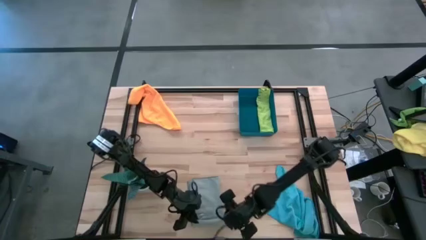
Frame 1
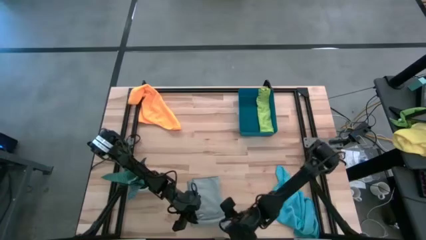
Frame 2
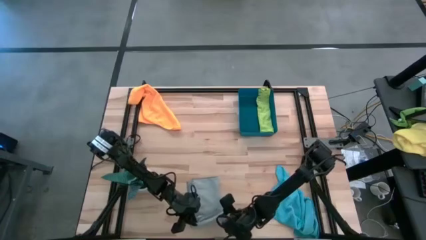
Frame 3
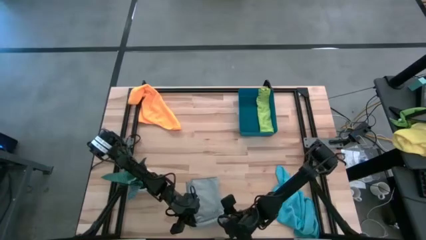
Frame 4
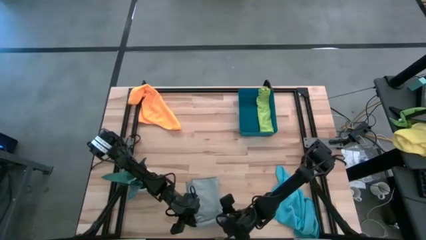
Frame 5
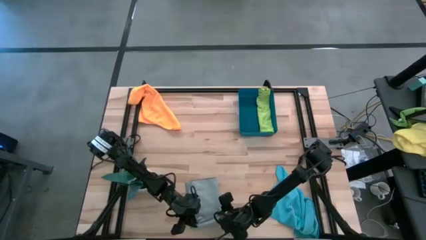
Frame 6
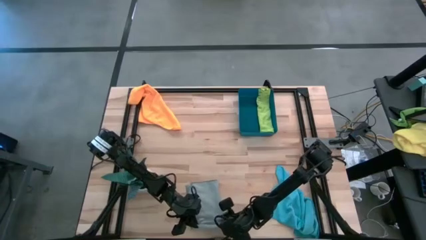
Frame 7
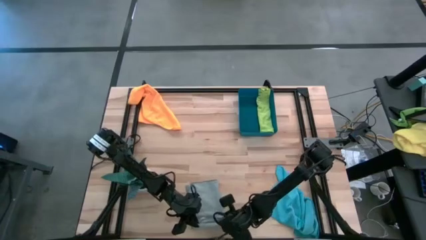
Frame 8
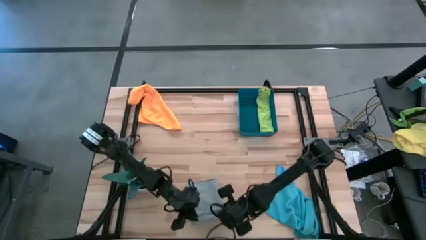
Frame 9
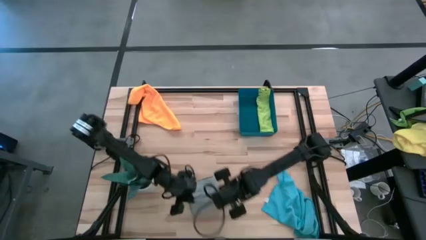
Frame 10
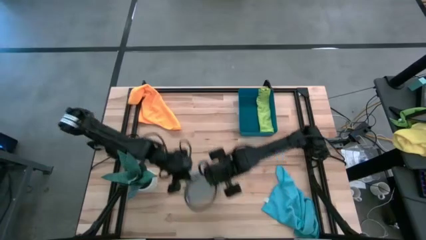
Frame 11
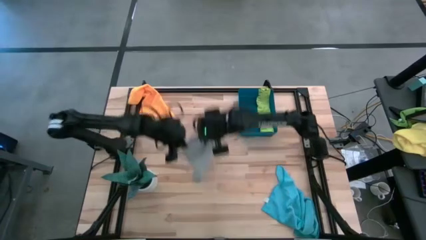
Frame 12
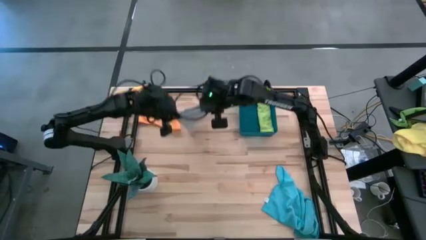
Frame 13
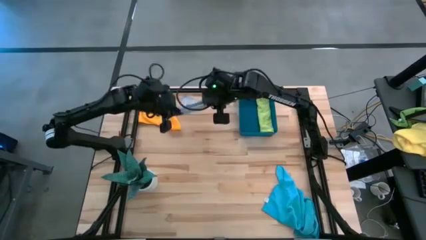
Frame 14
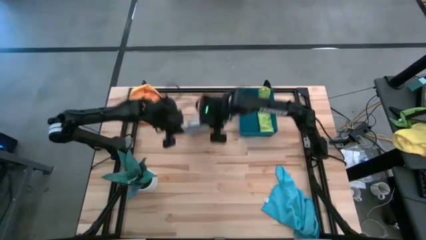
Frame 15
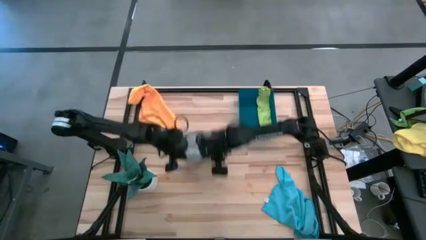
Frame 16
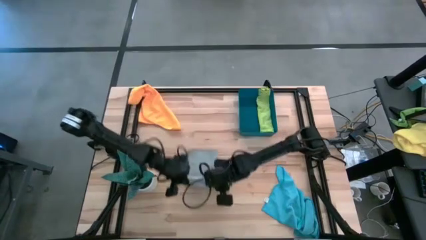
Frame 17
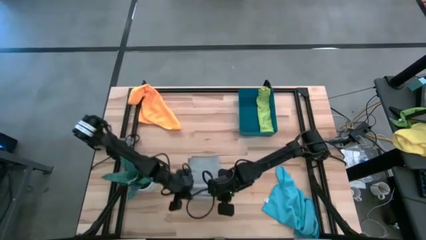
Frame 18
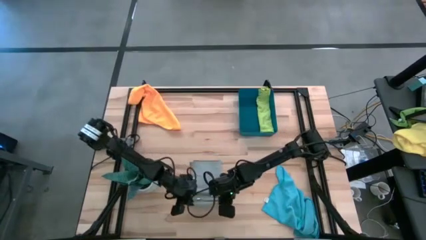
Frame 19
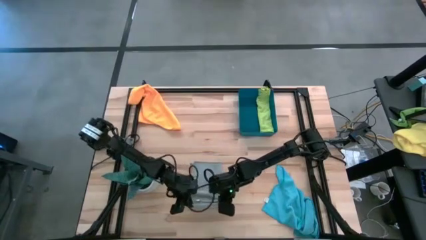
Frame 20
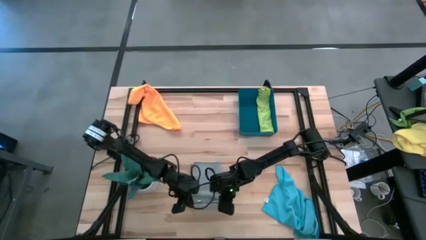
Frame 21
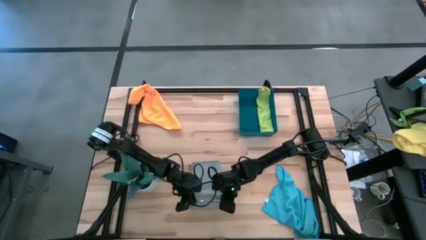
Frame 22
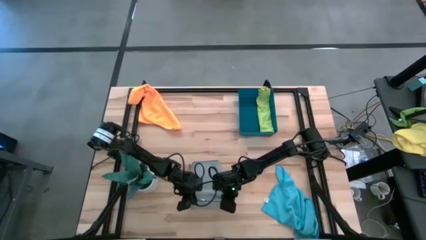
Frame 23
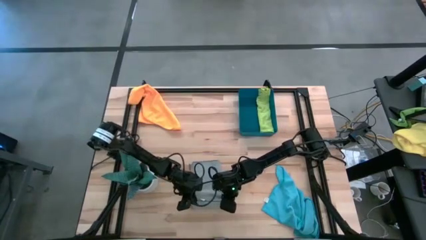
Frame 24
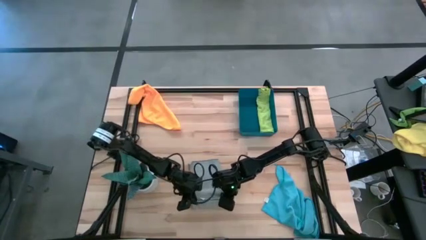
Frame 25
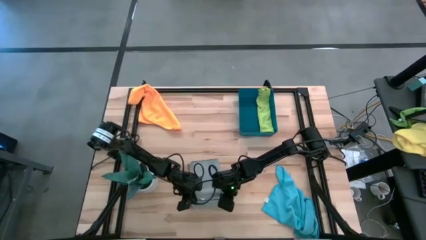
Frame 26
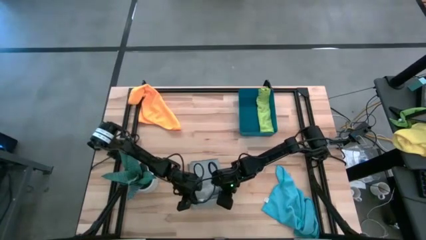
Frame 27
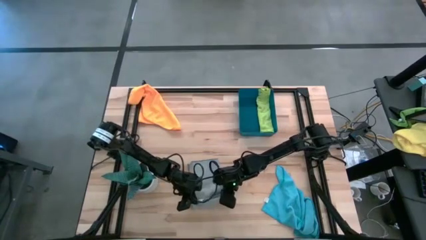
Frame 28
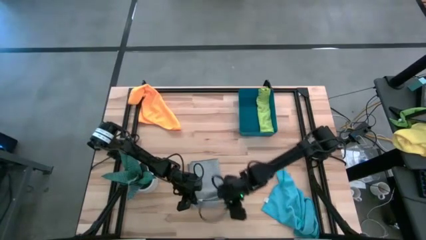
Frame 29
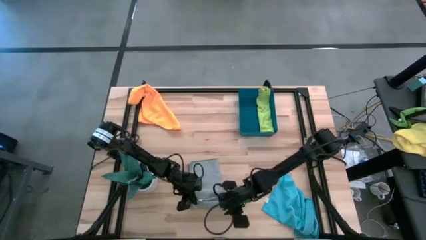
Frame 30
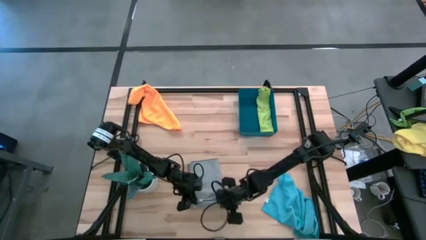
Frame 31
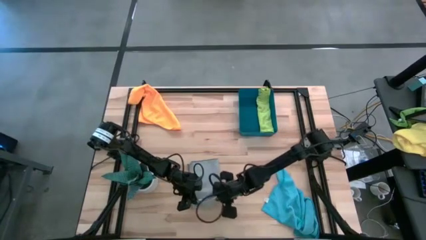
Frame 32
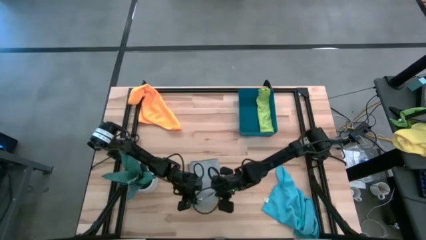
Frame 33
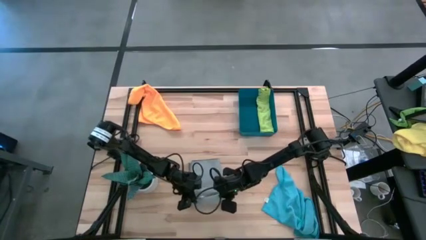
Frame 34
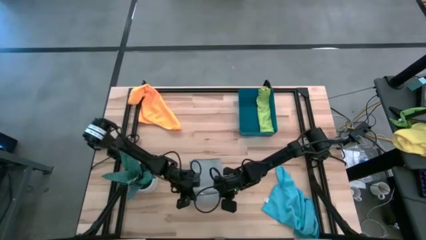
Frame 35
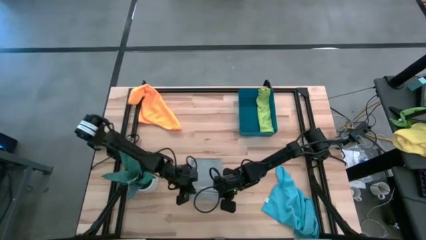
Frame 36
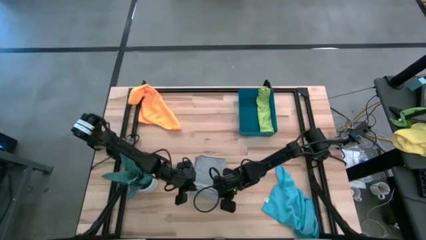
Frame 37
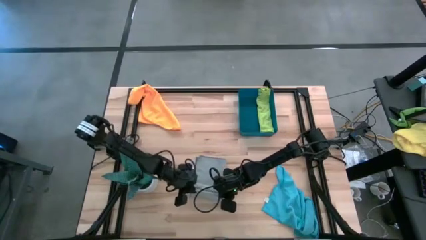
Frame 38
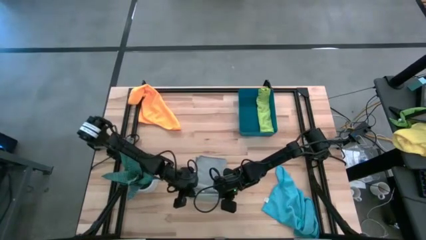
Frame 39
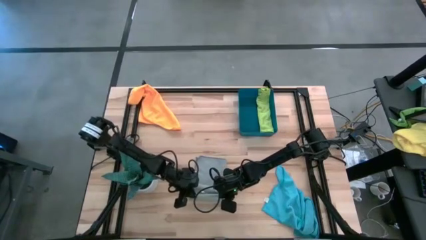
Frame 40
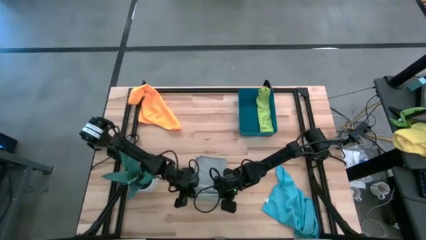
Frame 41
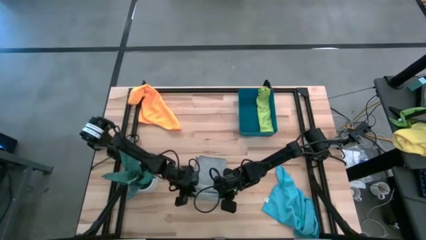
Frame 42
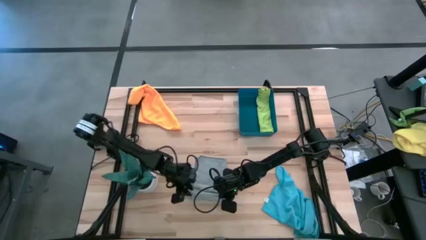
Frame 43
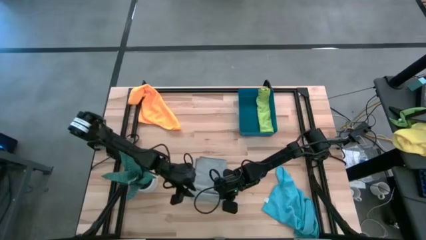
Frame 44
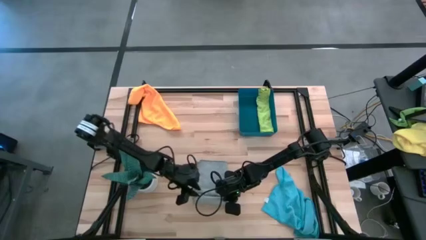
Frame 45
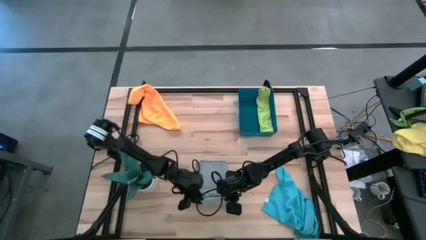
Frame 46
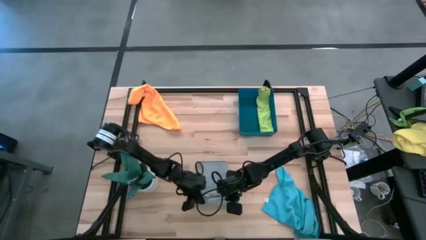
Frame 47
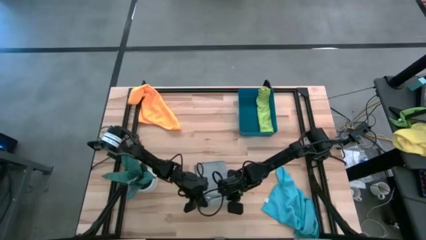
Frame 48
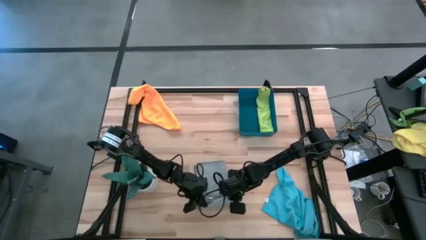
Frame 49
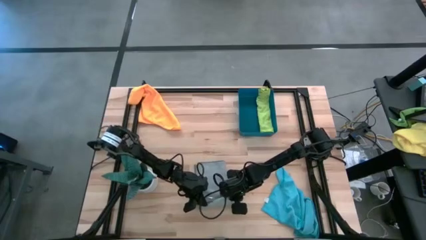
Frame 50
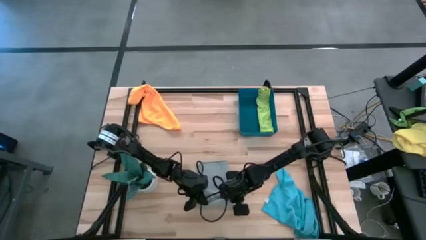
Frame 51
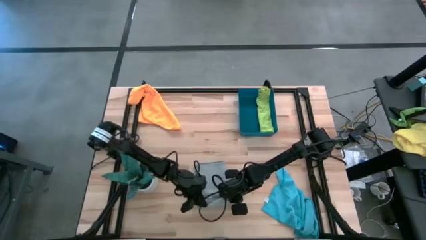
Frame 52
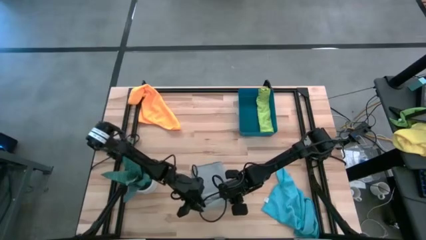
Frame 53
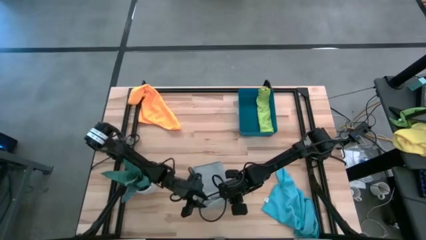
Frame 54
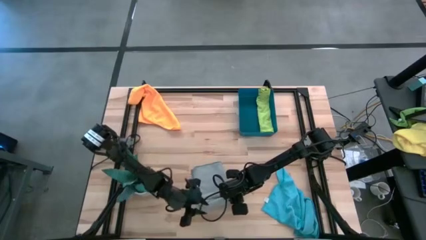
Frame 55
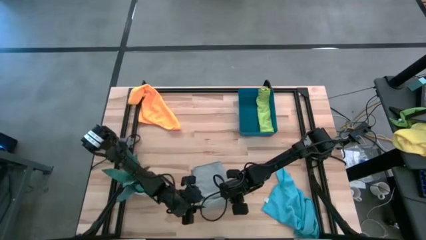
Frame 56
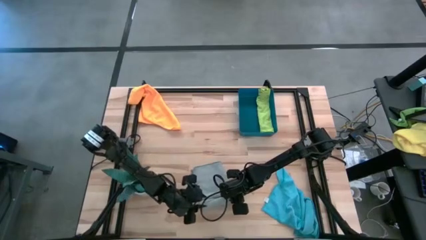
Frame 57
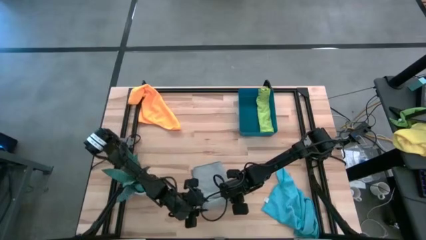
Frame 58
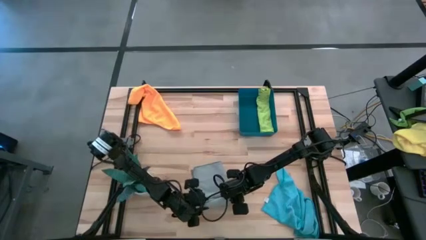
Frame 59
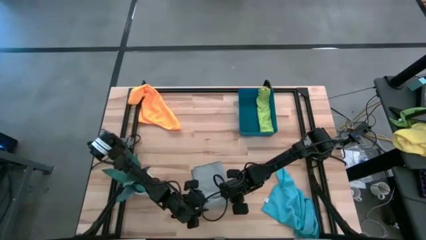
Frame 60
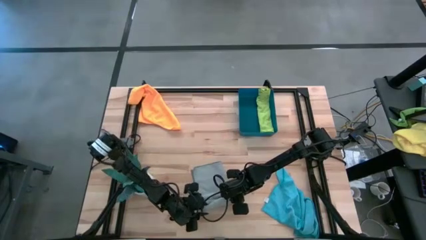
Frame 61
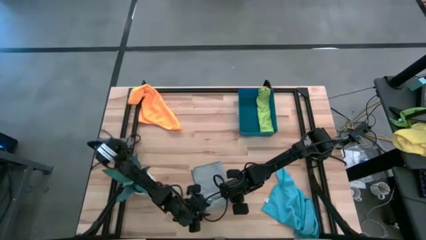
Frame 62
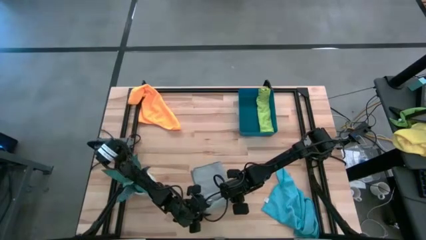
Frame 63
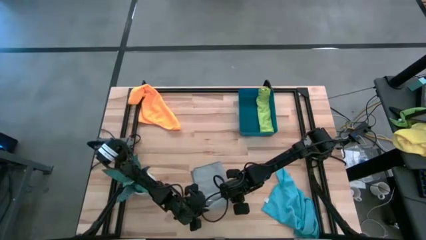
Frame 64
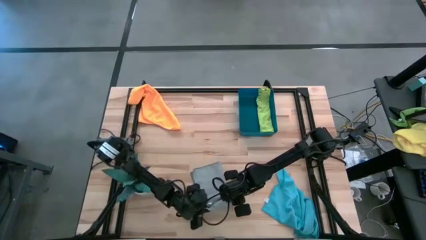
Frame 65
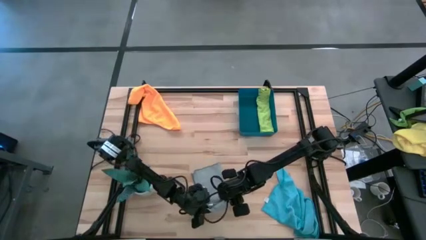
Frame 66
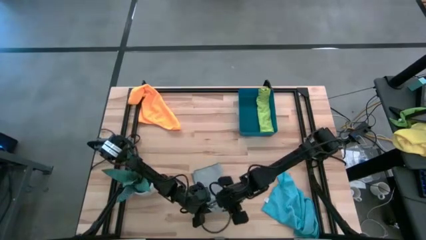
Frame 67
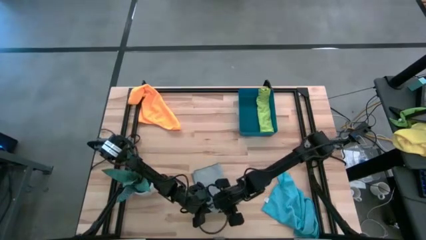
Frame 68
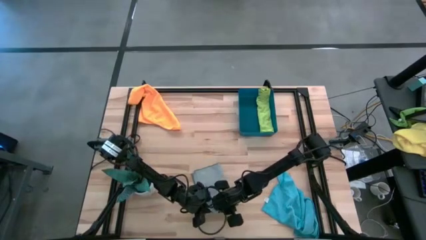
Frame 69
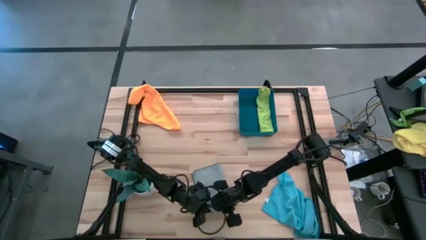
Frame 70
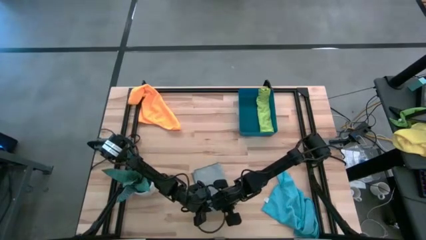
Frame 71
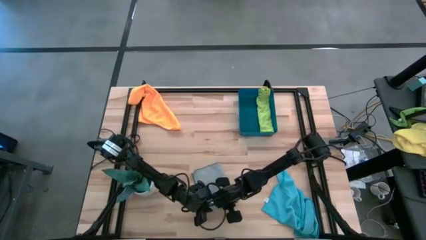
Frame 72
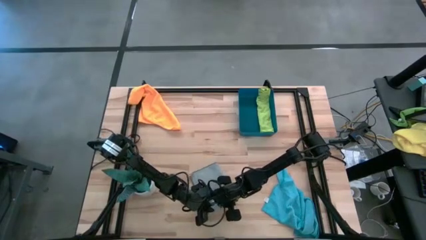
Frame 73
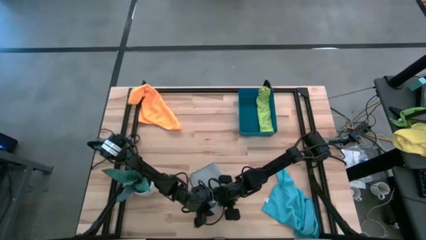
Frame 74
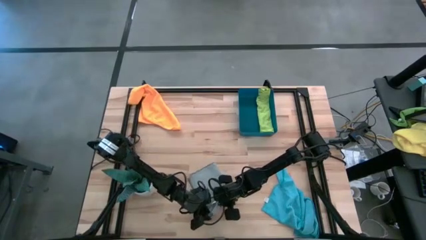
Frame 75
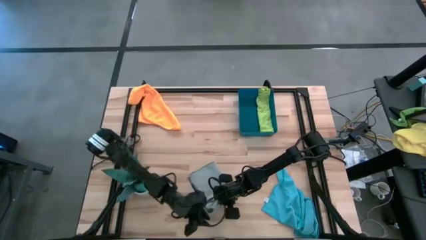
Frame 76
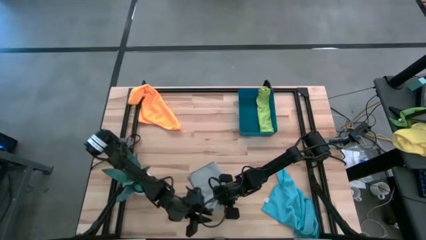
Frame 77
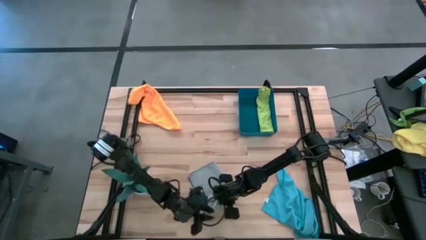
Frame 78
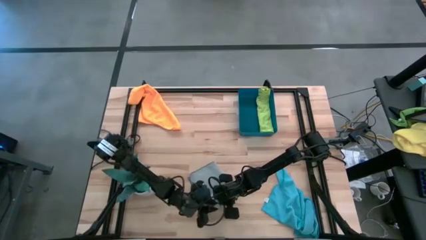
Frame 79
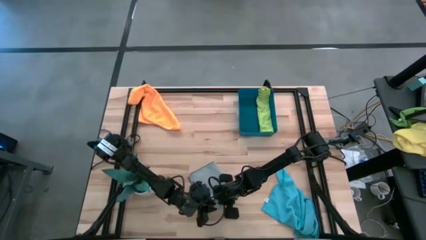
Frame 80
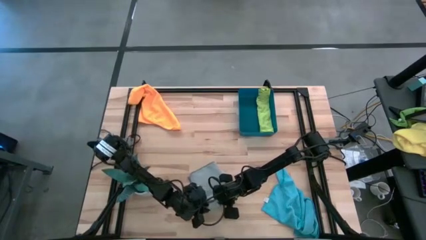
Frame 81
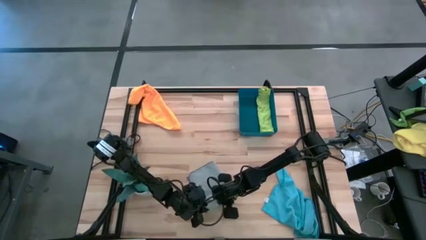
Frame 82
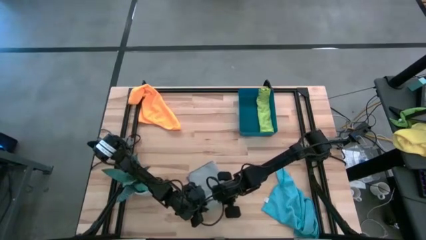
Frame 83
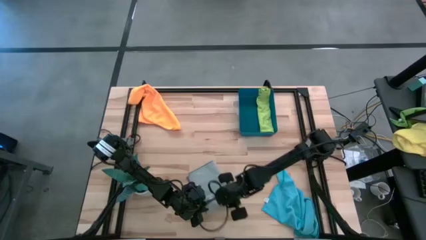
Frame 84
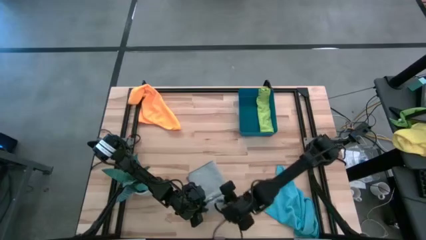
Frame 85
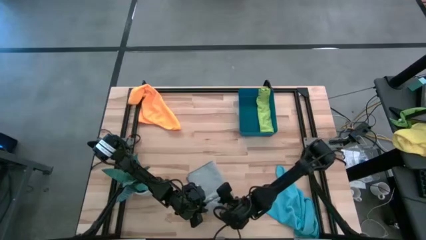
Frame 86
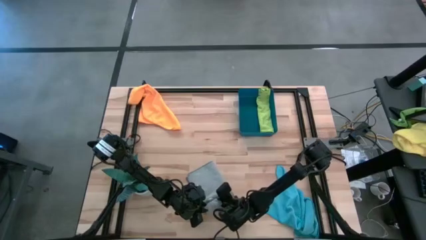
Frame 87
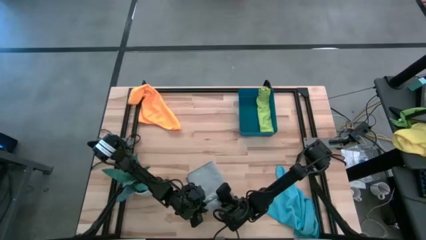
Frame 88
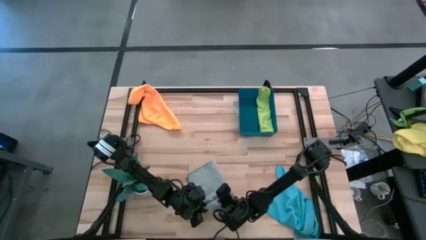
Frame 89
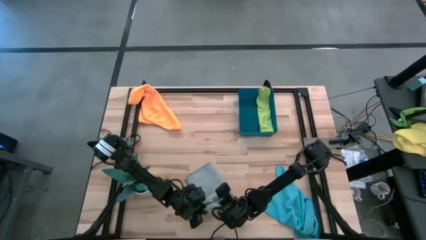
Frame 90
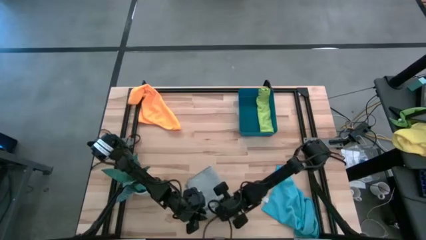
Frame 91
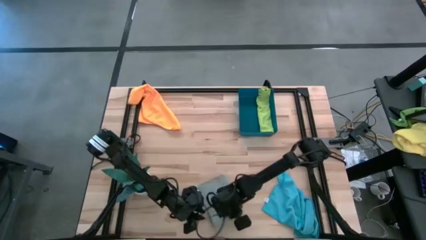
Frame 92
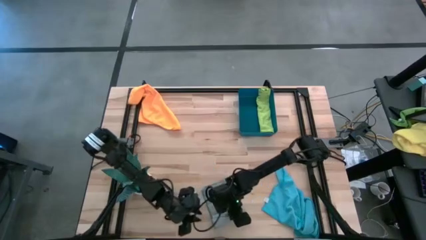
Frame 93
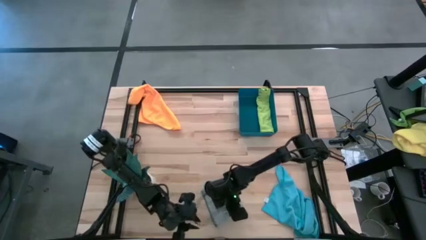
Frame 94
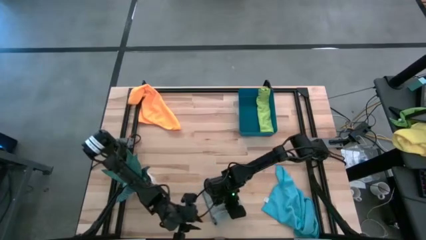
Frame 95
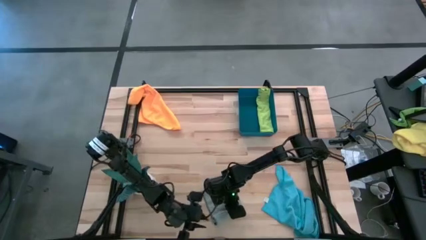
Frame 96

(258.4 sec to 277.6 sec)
Task: Roll microfiber towels into tight, uniform cylinder then place into a basket
Roll the gray towel
